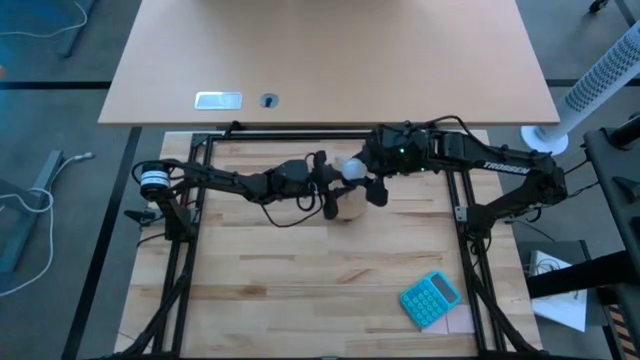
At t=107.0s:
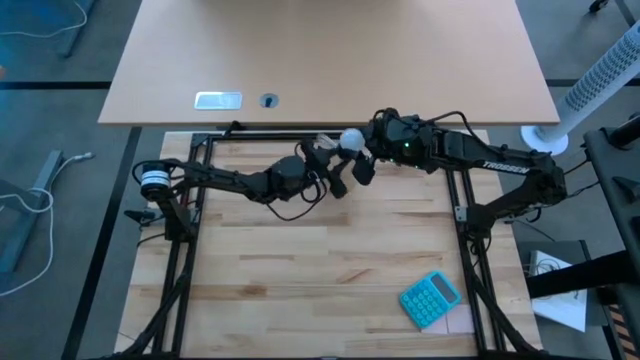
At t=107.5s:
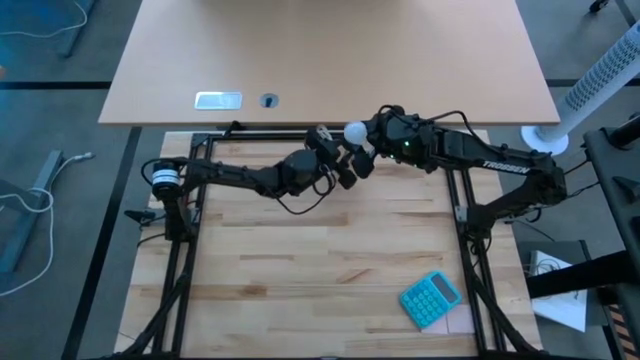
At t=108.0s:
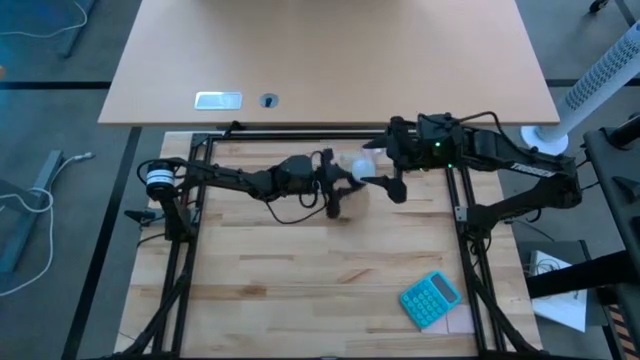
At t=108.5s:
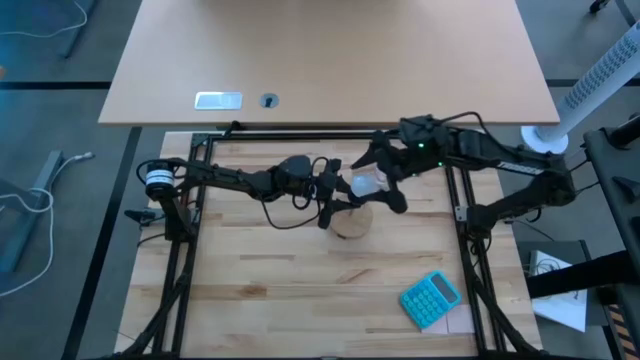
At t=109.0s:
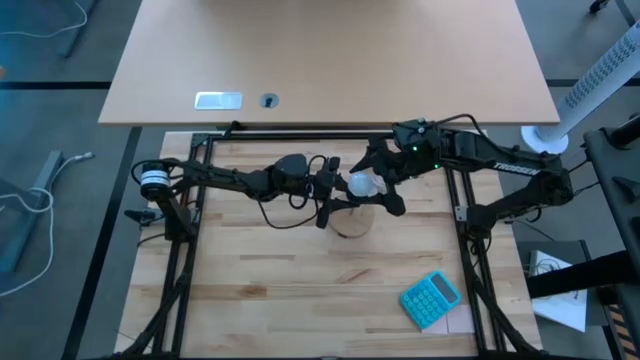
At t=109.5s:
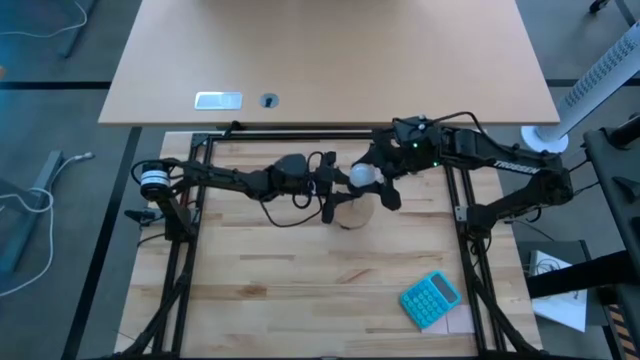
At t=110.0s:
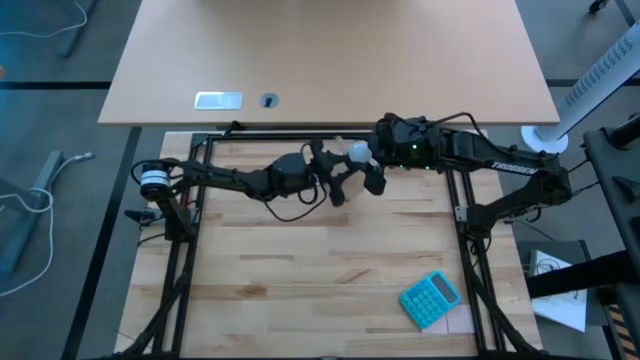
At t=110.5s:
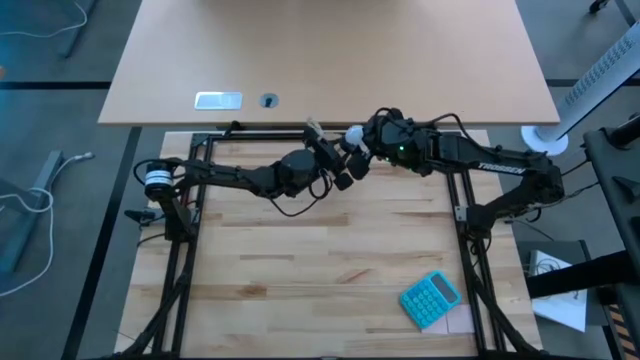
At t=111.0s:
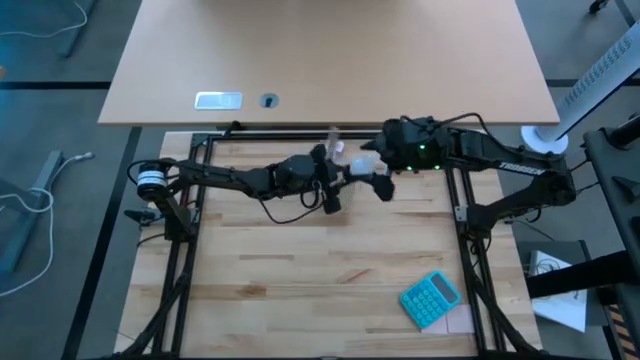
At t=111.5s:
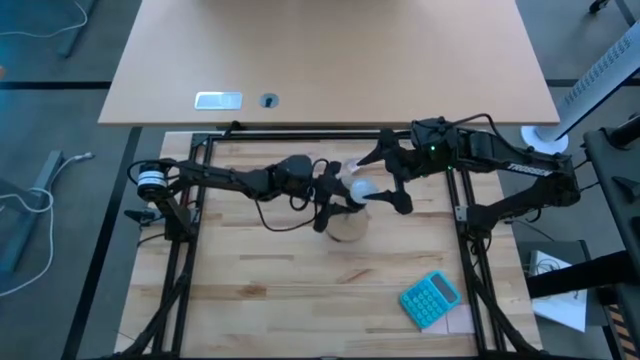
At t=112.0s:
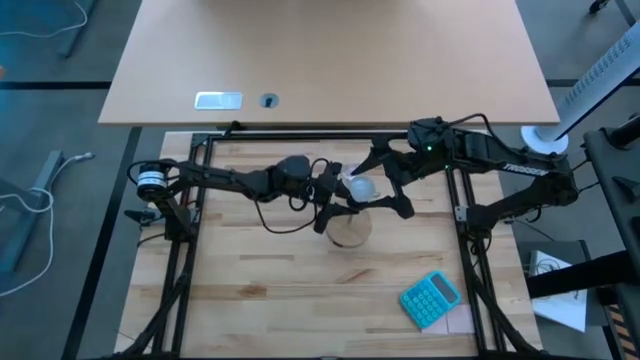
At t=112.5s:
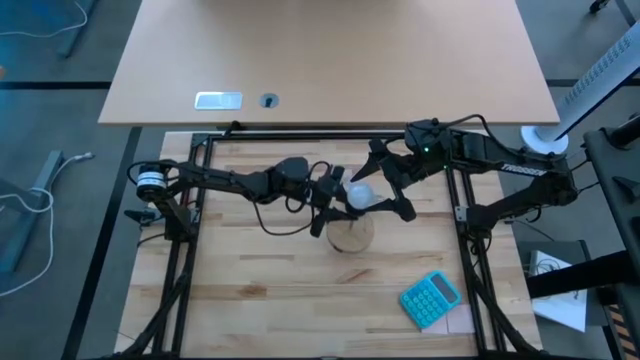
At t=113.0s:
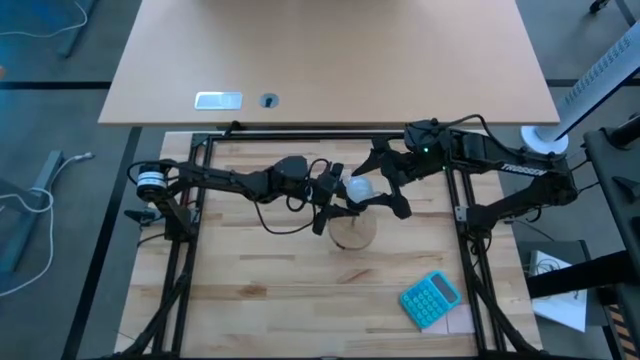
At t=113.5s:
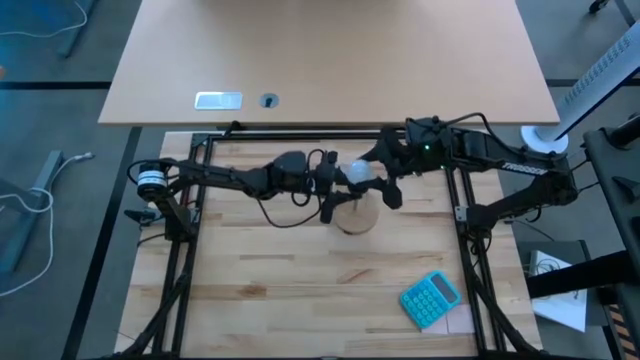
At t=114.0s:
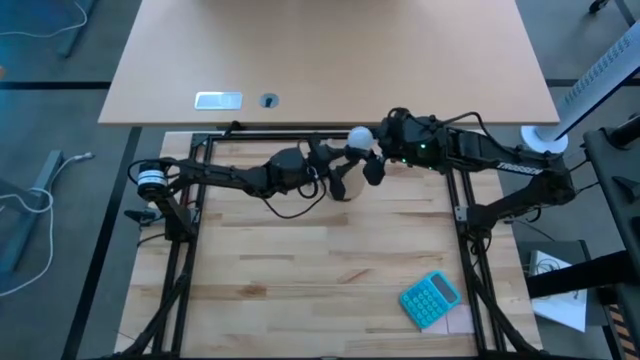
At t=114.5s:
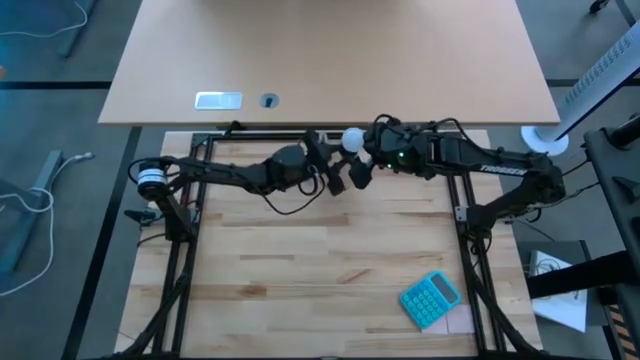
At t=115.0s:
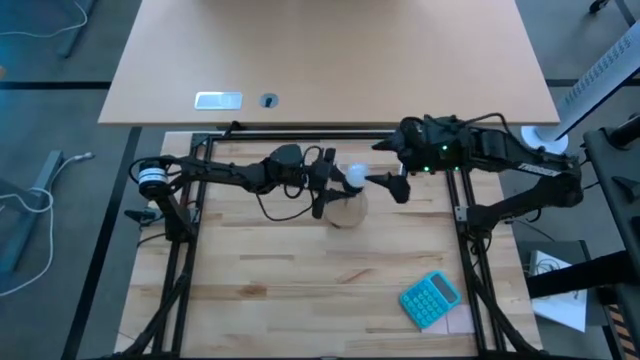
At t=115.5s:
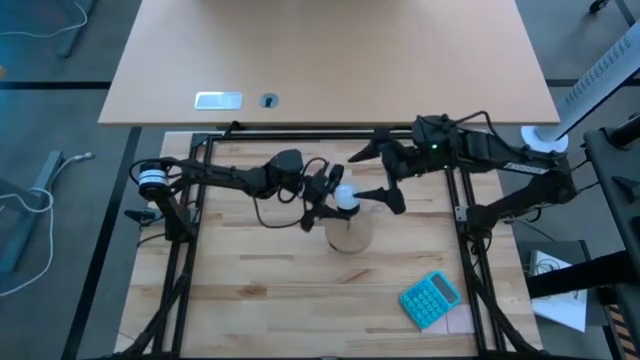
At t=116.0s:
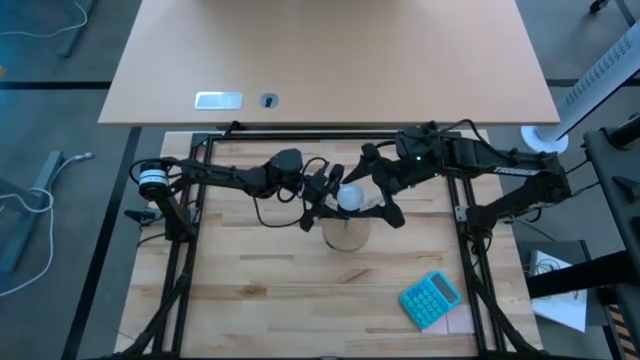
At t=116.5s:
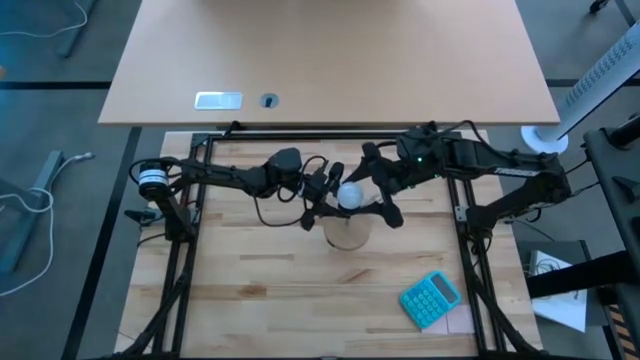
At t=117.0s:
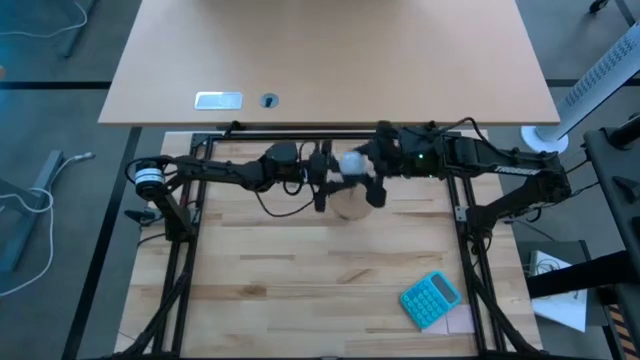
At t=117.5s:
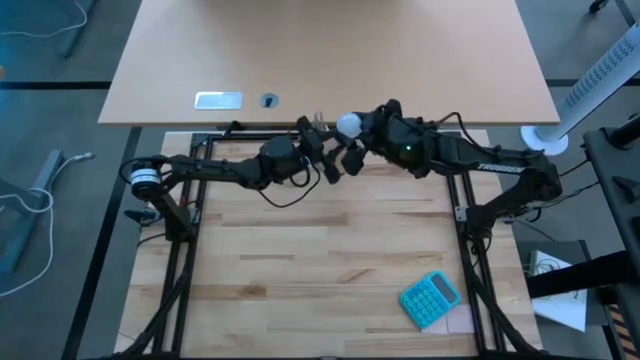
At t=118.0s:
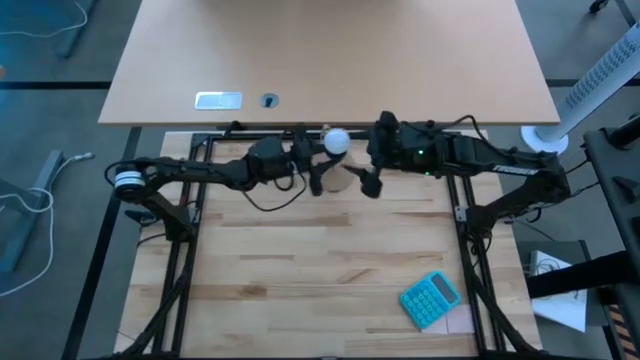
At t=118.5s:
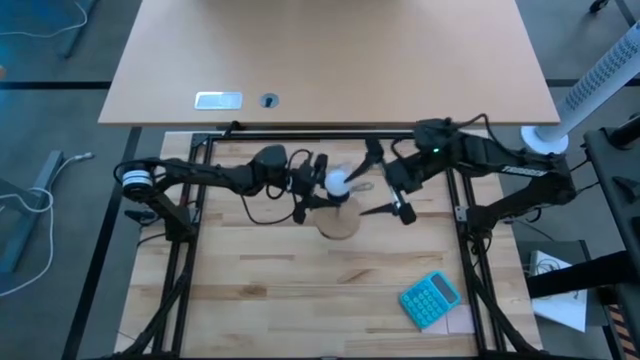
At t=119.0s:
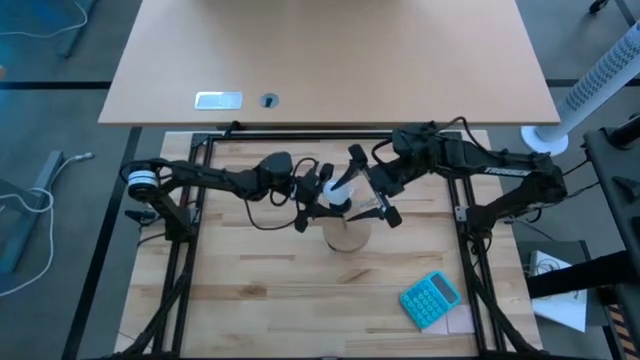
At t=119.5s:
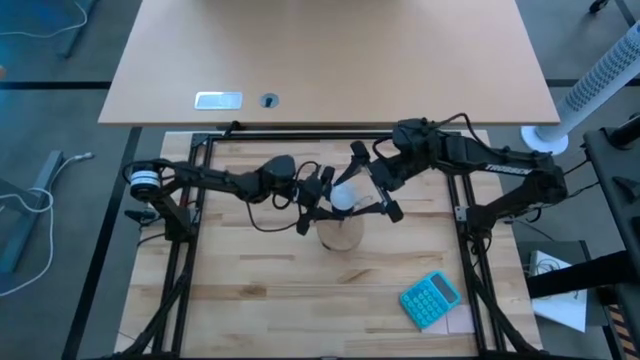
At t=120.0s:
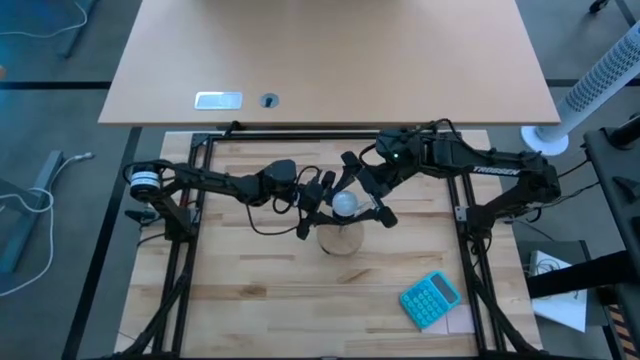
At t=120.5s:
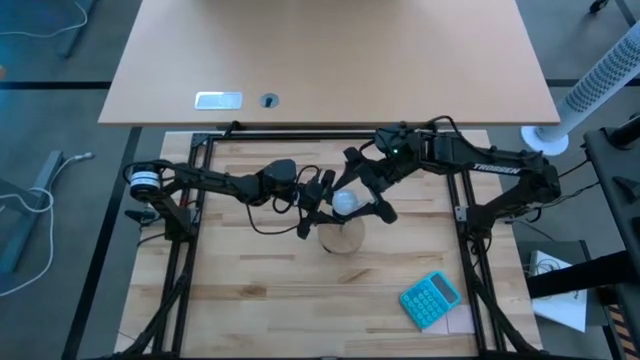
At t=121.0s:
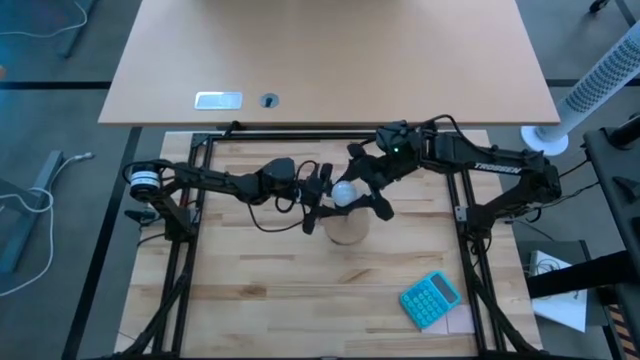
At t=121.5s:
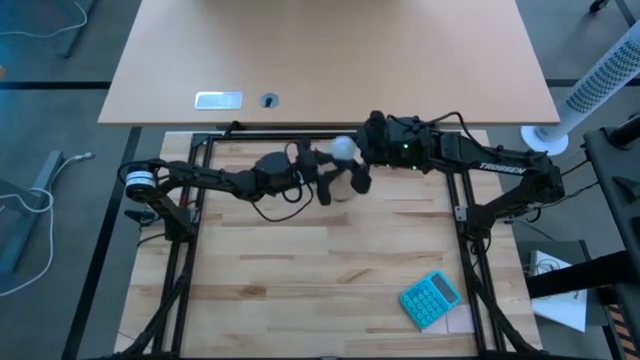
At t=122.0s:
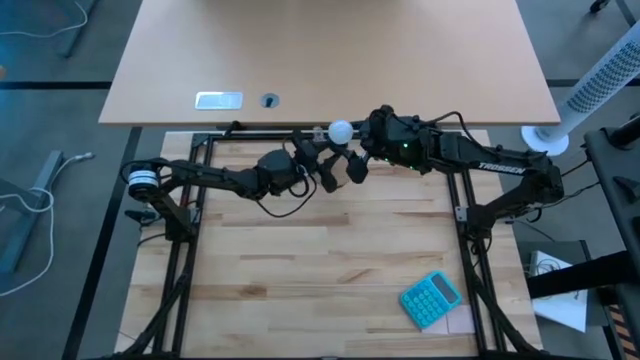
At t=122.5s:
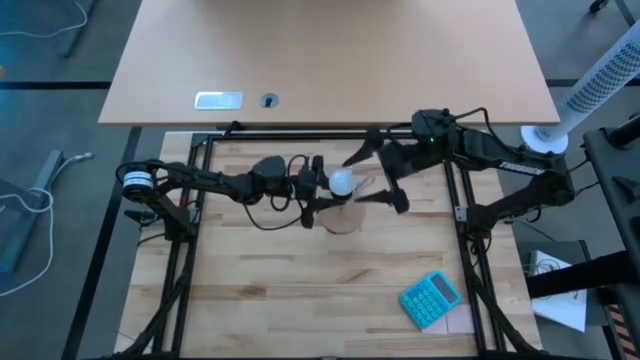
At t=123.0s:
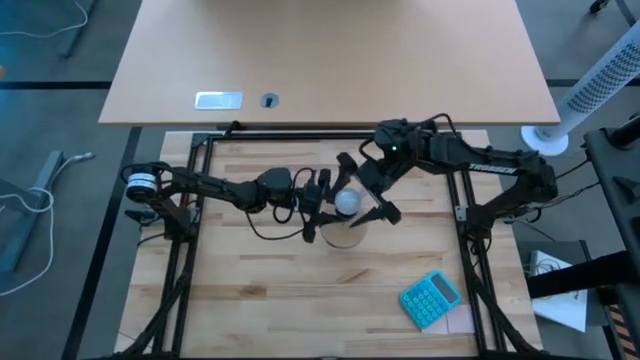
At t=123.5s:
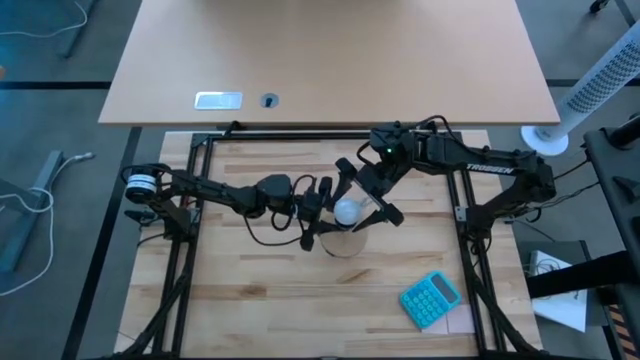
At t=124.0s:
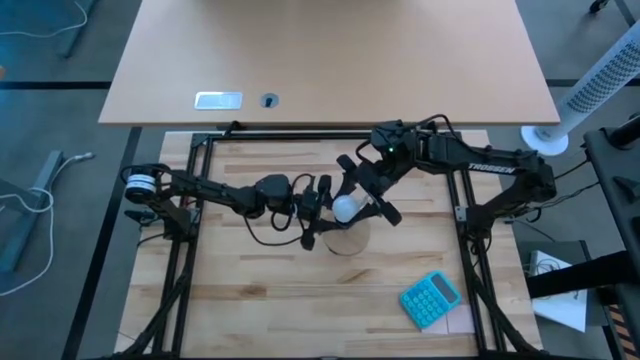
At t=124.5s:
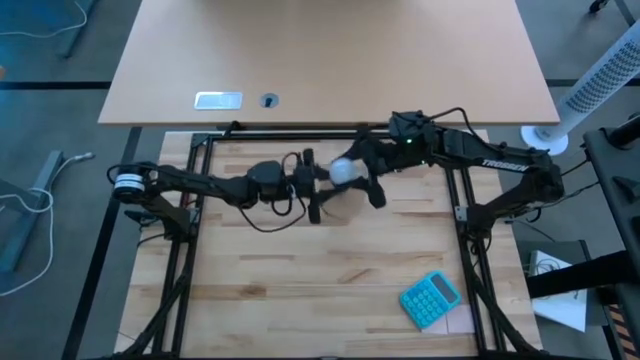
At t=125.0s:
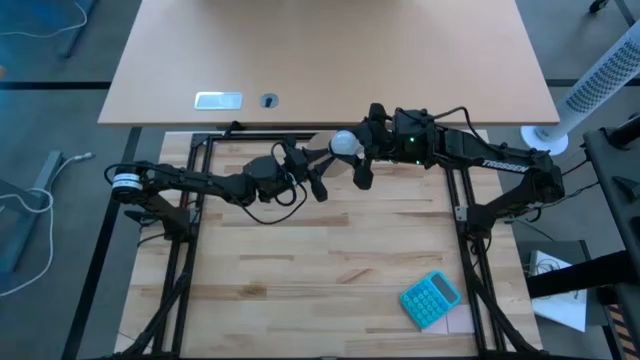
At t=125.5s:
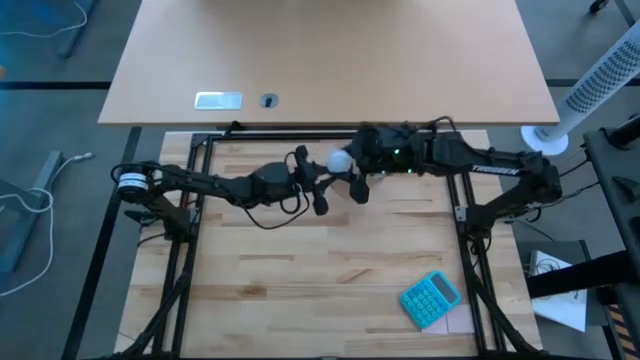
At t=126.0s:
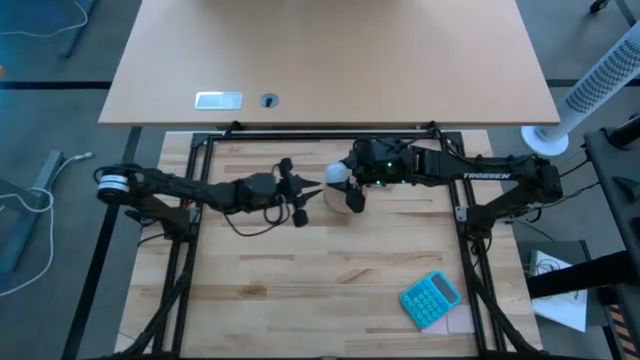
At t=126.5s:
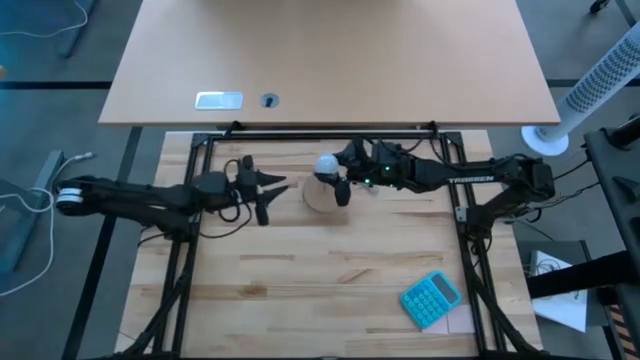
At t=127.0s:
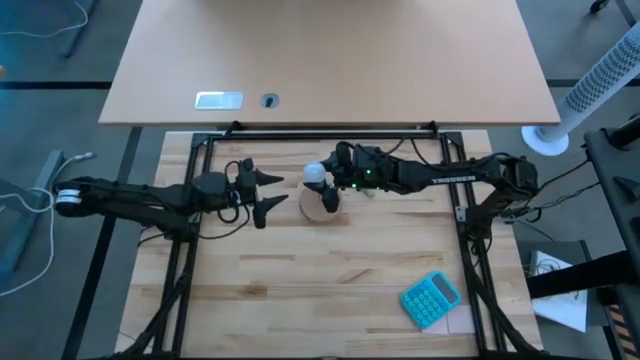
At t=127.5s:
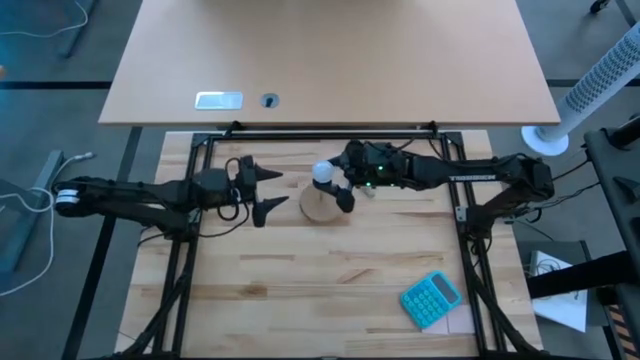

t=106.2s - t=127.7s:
Task: Screw lightbulb
Insert the lightbulb into the lamp
